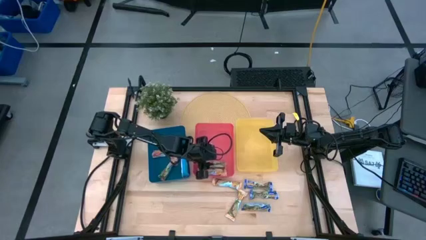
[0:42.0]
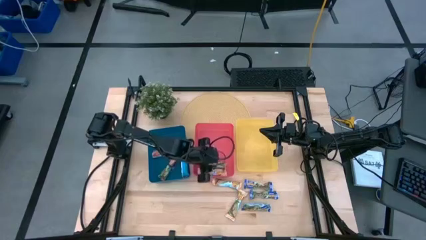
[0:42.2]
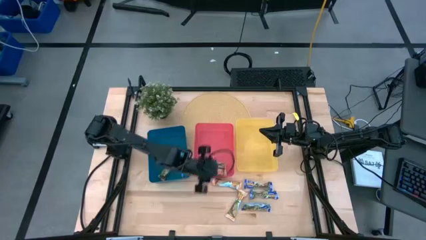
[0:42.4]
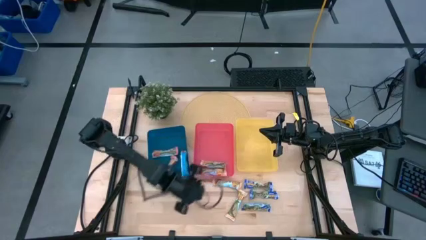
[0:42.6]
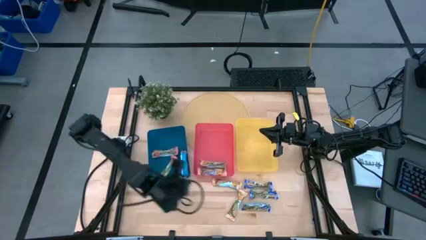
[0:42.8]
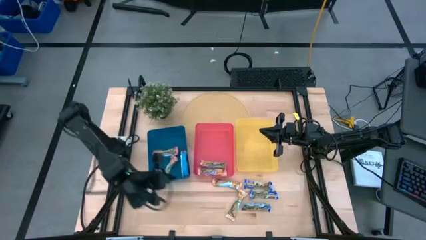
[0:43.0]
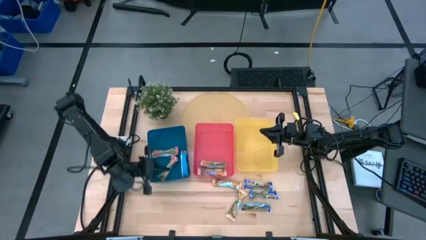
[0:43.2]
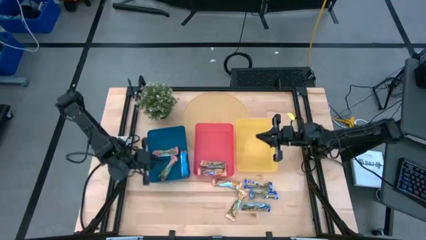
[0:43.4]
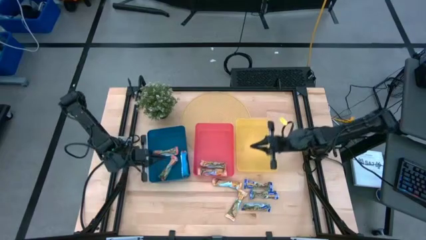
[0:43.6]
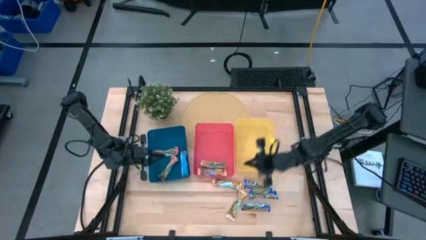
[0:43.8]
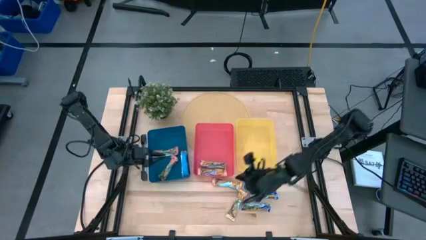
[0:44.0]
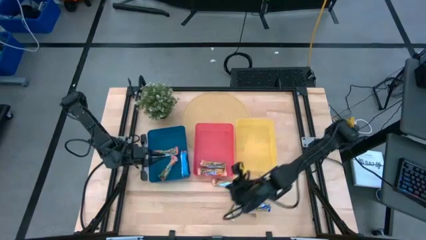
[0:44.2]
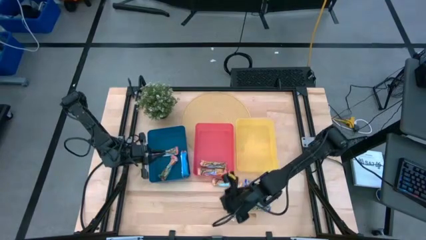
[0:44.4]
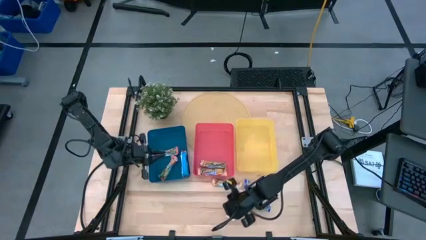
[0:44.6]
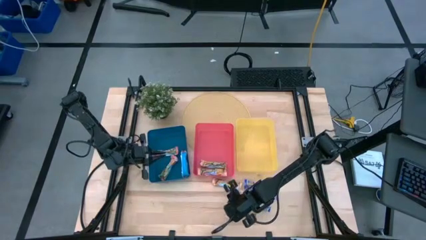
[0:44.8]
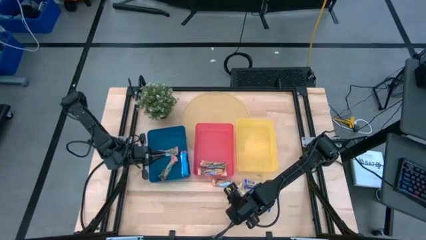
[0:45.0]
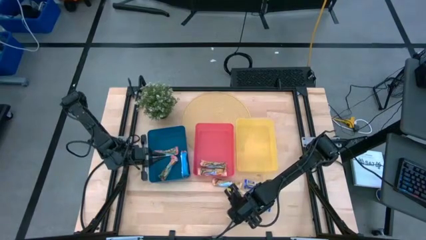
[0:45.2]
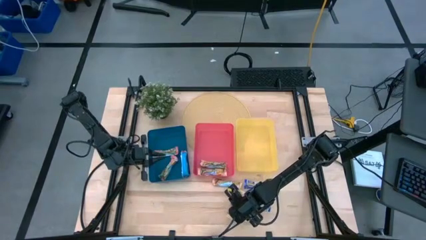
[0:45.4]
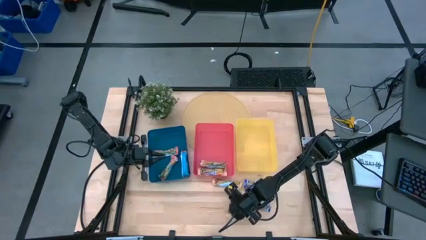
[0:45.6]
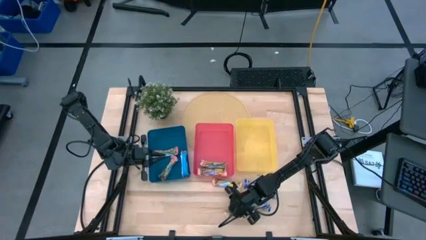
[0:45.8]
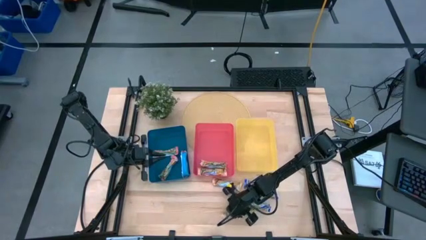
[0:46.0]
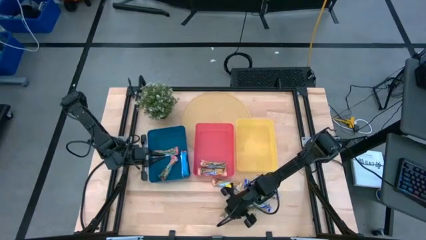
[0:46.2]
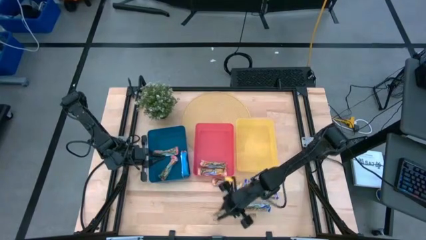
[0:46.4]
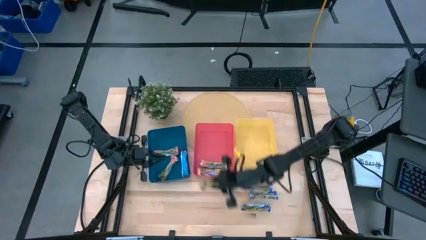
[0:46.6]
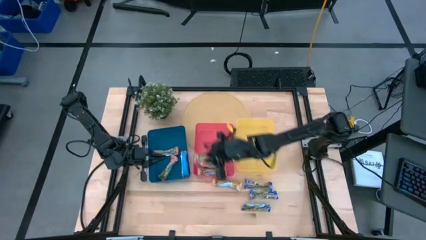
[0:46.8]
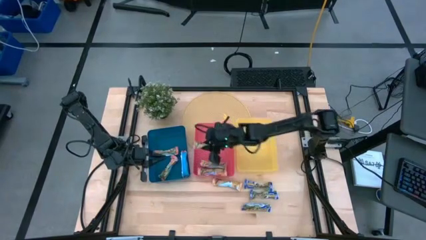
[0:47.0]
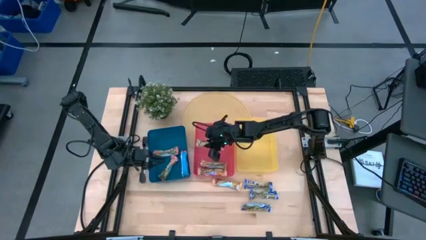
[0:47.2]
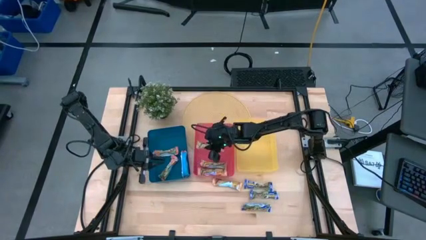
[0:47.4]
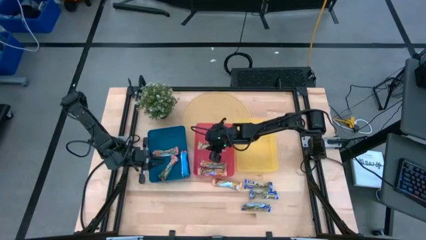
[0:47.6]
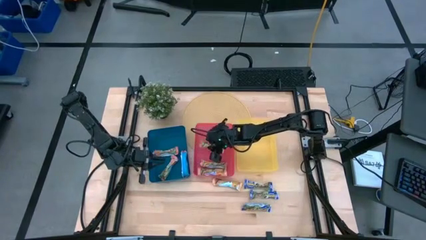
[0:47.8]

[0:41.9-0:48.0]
Task: Pick and place Granola Bars by type
Put the yellow granola bar into the pink bin

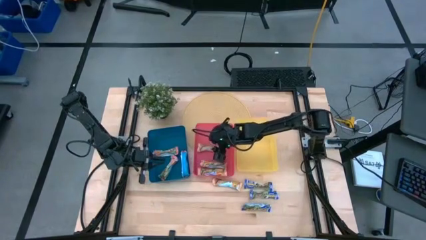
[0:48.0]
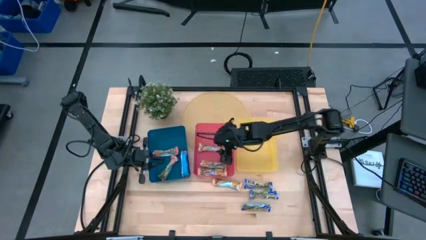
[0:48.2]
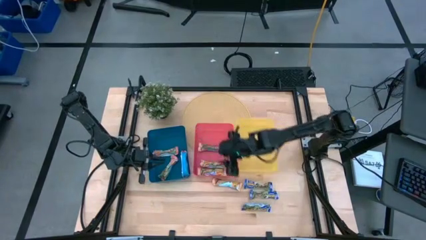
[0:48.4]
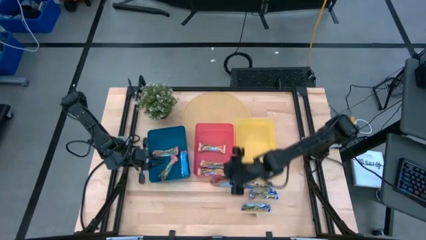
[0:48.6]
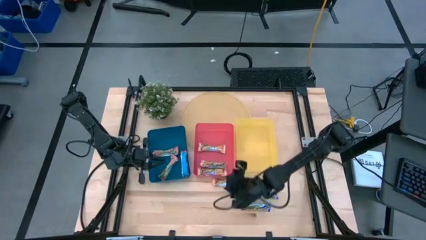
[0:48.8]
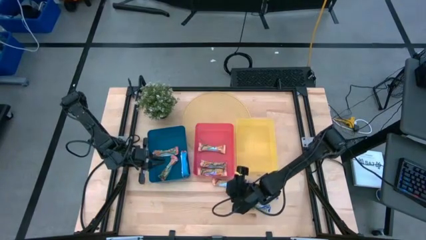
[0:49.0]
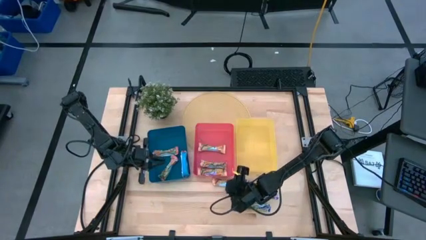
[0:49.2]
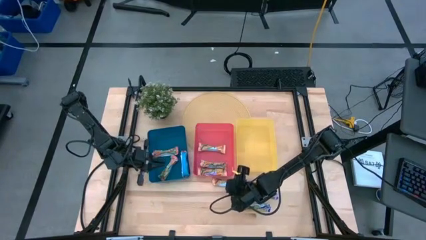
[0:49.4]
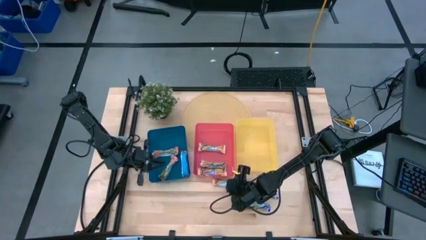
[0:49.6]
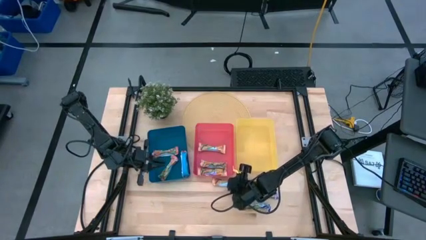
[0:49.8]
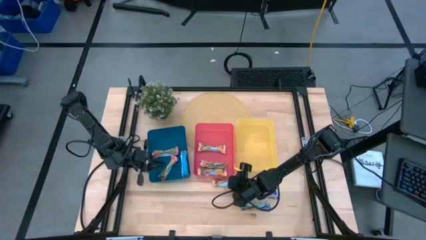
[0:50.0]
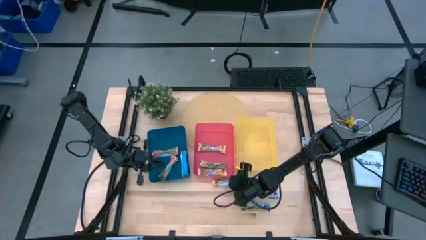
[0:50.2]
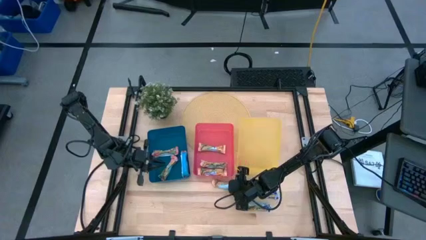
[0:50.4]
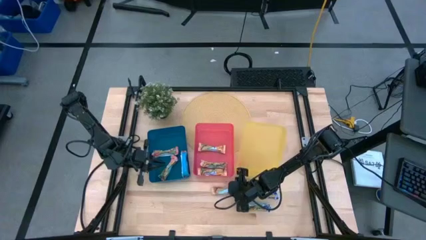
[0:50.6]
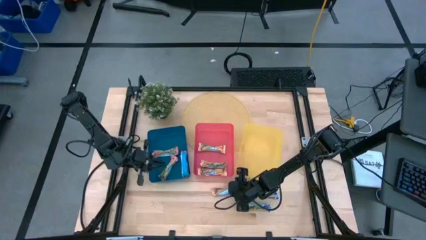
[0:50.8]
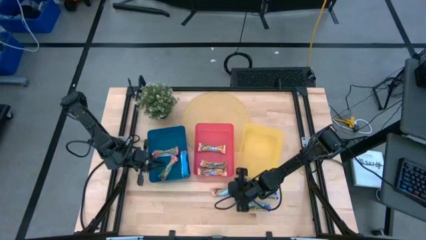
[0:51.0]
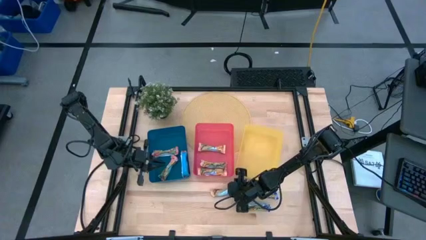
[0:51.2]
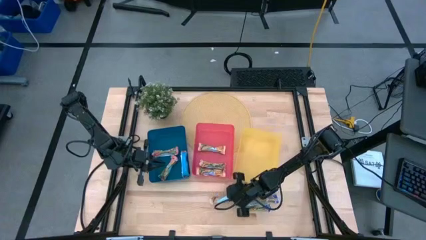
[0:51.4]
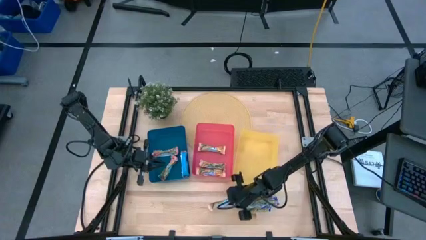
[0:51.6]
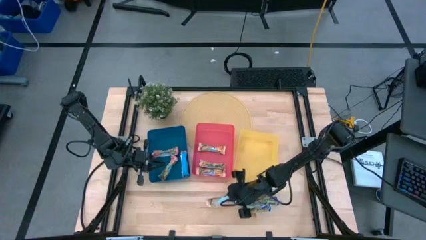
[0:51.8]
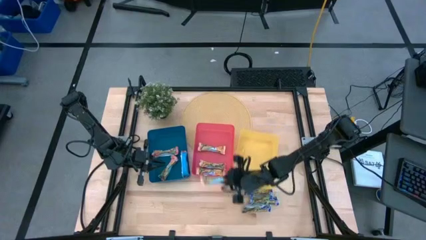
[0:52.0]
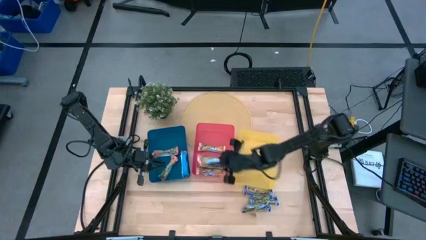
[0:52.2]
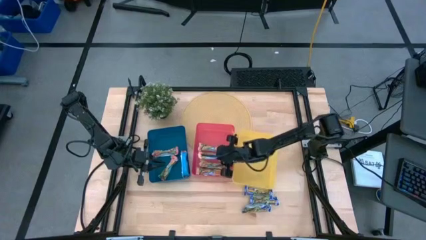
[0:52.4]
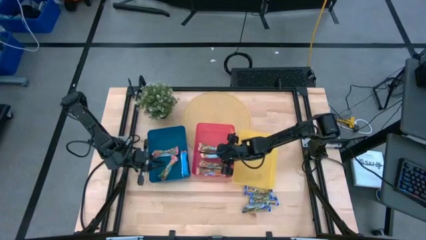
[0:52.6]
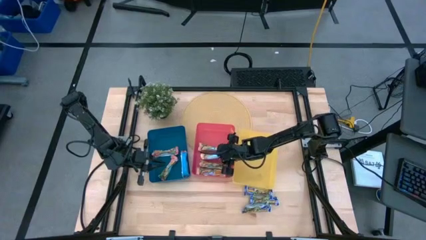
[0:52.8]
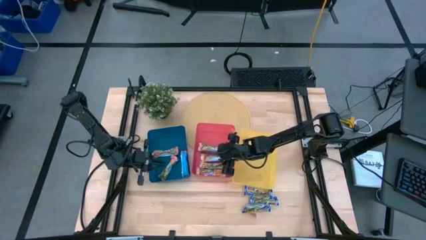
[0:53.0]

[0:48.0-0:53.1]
Put the yellow granola bar into the pink bin

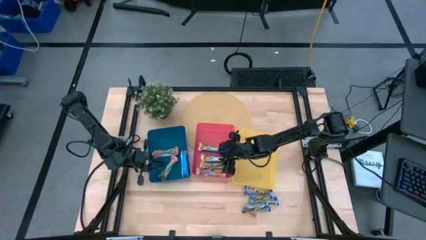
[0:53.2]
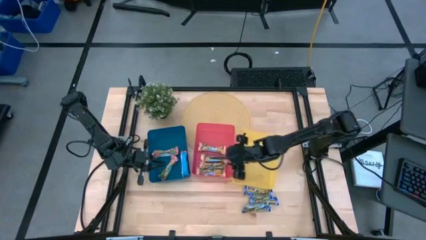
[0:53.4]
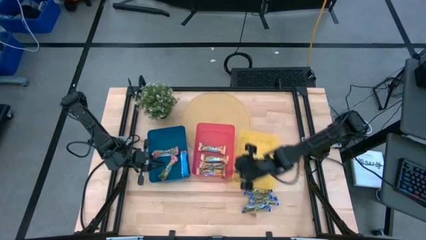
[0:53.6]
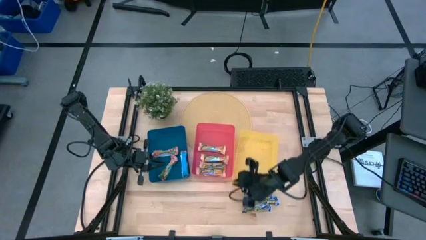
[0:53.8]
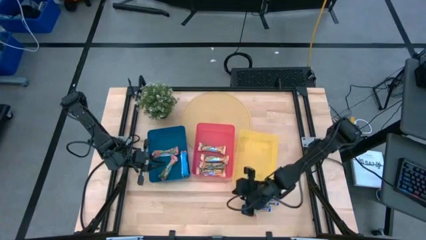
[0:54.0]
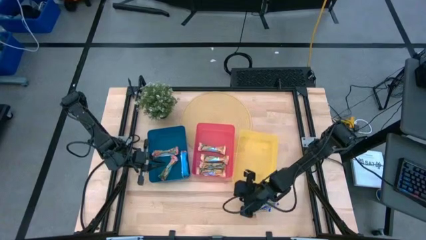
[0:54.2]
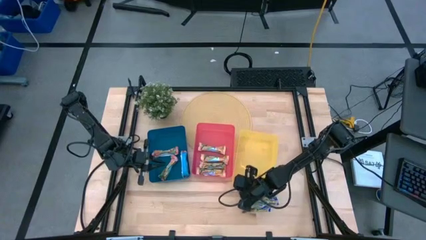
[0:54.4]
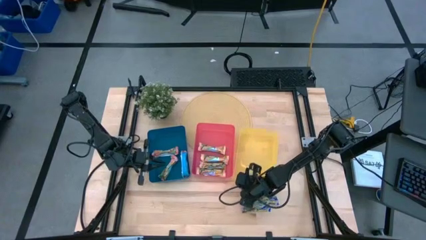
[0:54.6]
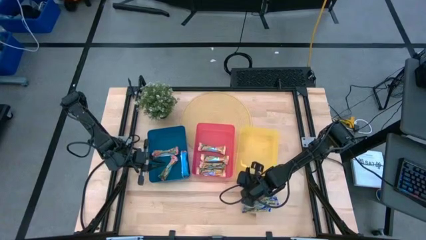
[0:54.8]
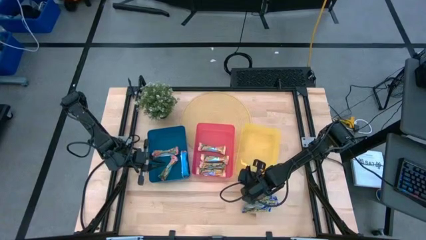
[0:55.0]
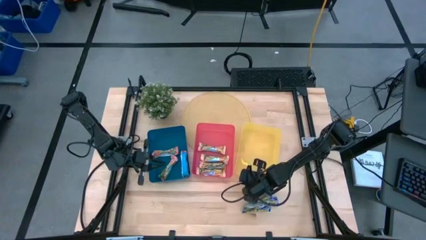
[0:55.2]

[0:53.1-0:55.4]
Adjust the yellow bin

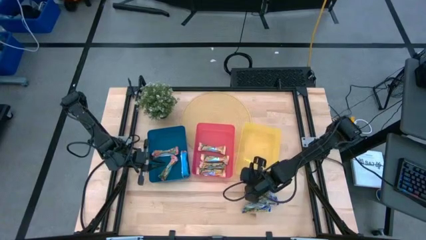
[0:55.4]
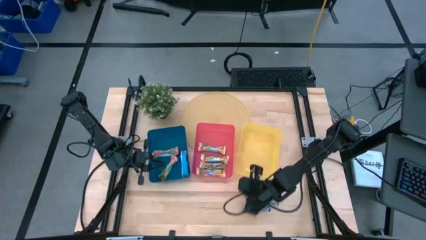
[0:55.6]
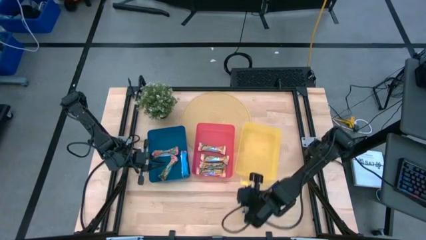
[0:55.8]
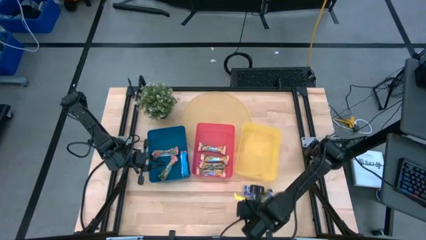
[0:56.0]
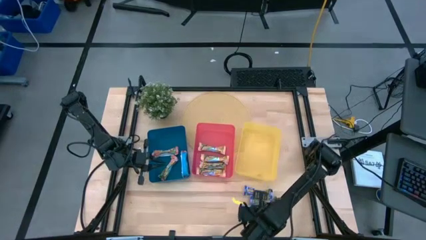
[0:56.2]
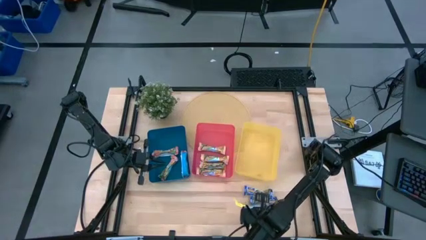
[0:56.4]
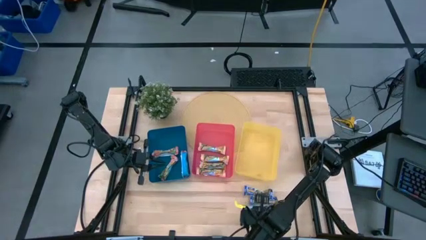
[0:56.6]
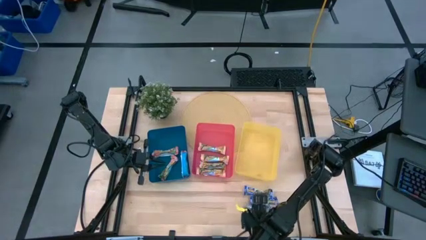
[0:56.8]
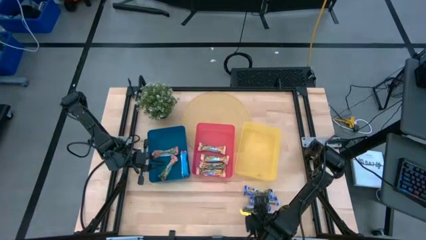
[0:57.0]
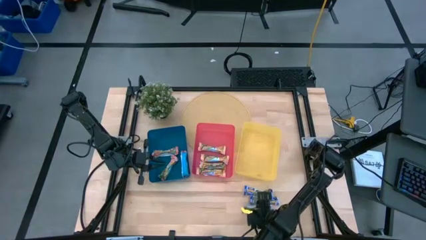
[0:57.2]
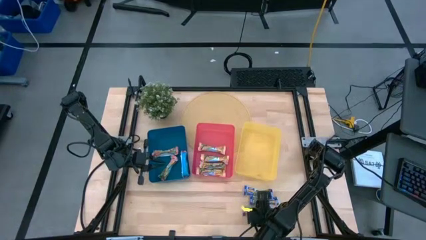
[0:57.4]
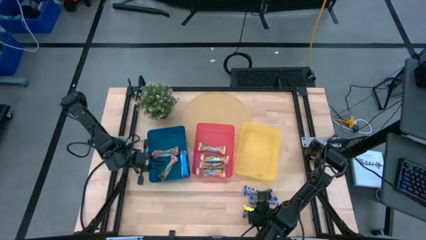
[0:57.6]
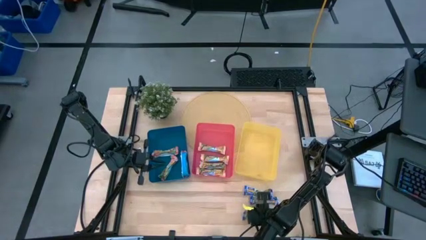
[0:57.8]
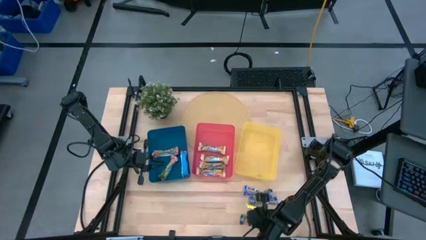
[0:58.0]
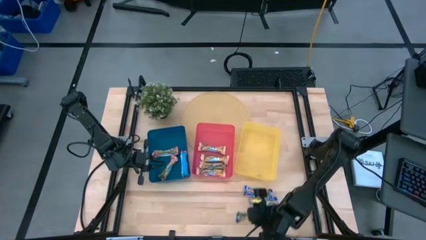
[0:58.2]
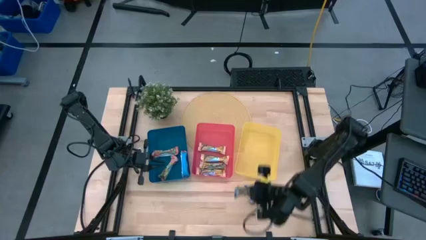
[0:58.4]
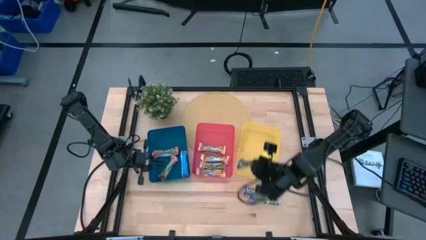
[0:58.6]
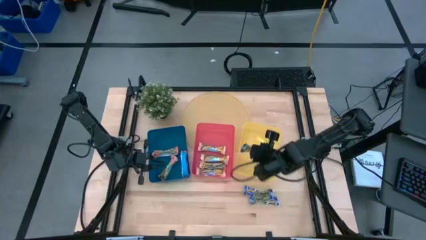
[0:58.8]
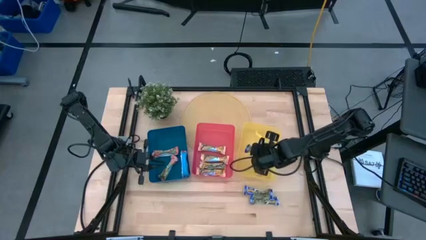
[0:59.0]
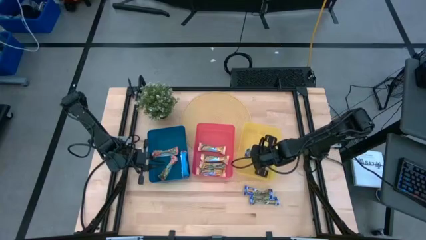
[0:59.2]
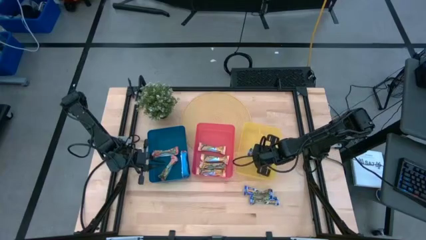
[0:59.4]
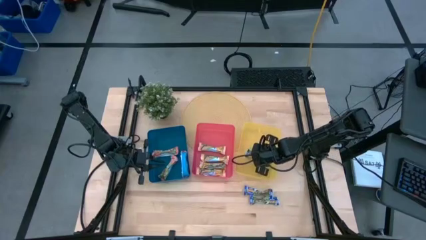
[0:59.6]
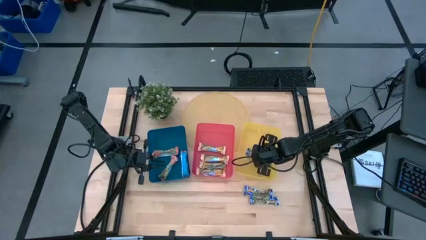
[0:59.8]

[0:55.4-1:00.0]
Put the bottom blue granola bar into the yellow bin
